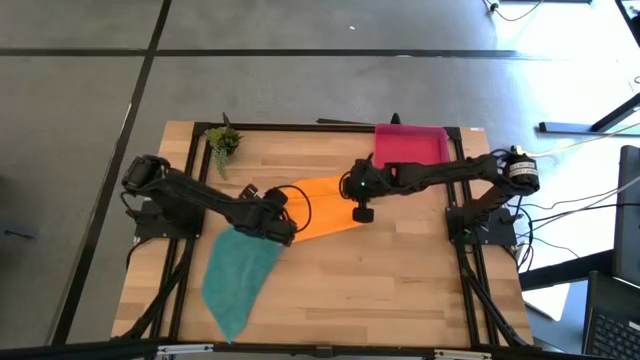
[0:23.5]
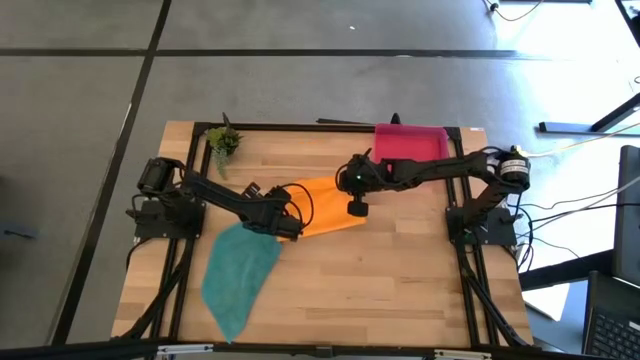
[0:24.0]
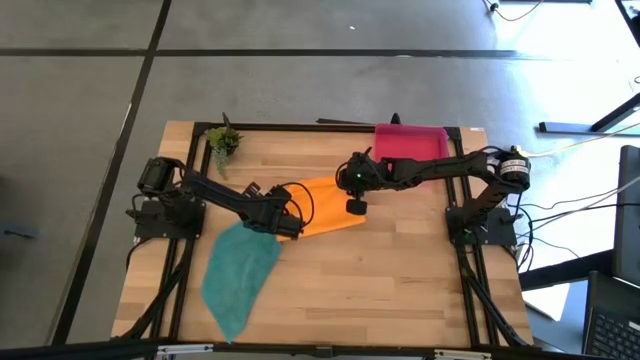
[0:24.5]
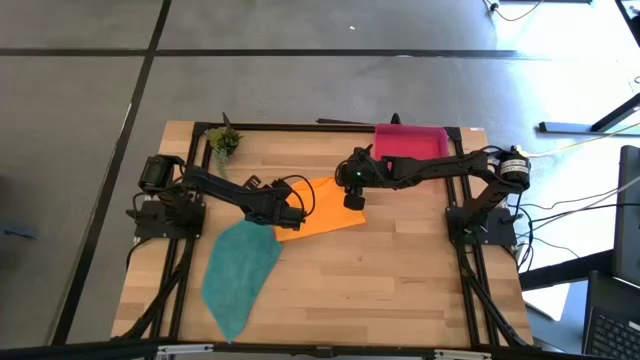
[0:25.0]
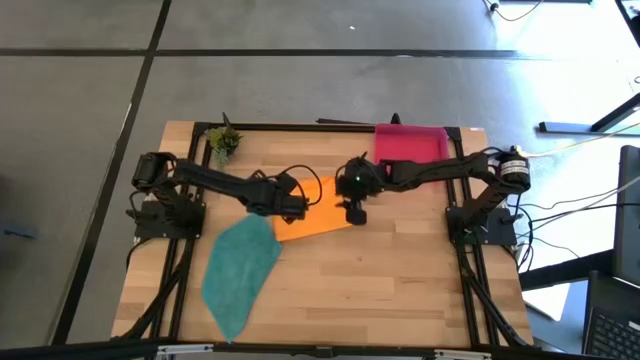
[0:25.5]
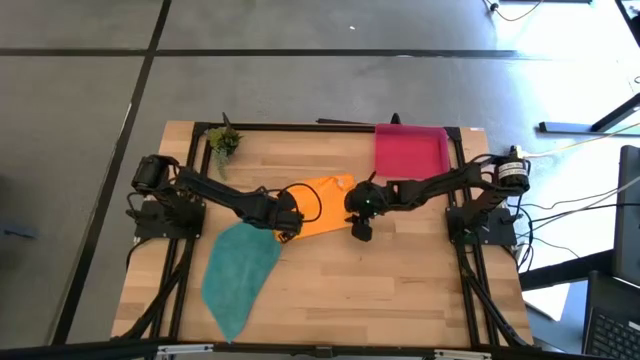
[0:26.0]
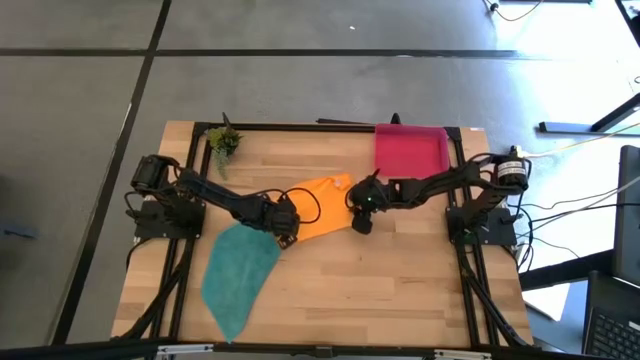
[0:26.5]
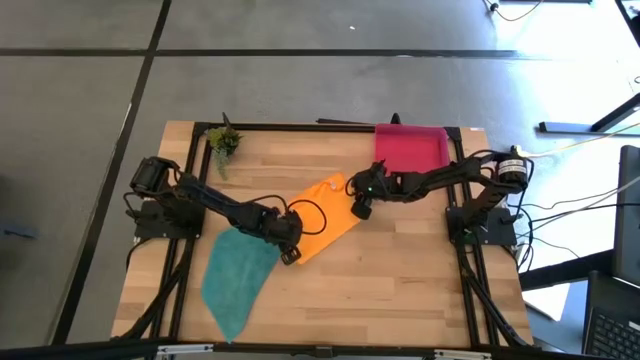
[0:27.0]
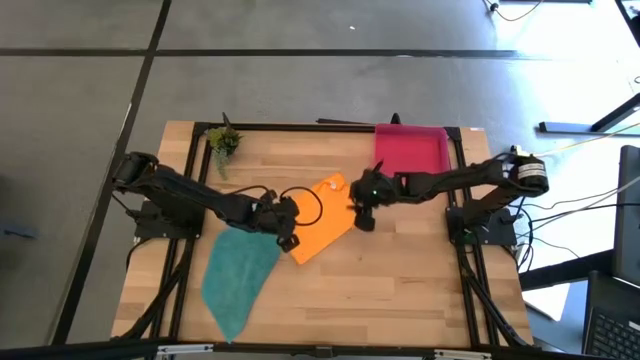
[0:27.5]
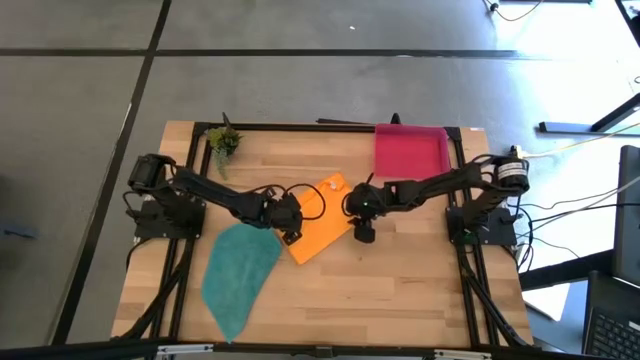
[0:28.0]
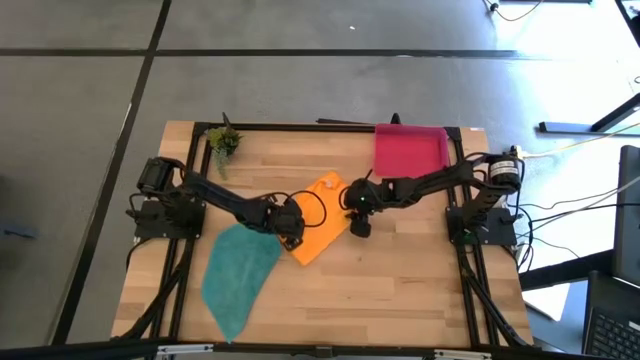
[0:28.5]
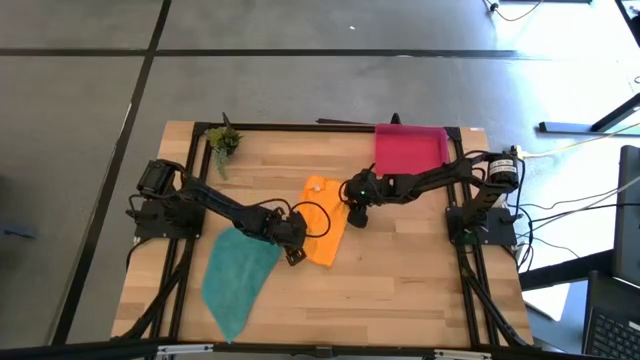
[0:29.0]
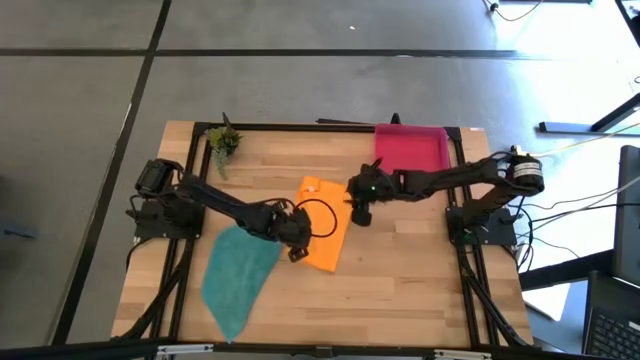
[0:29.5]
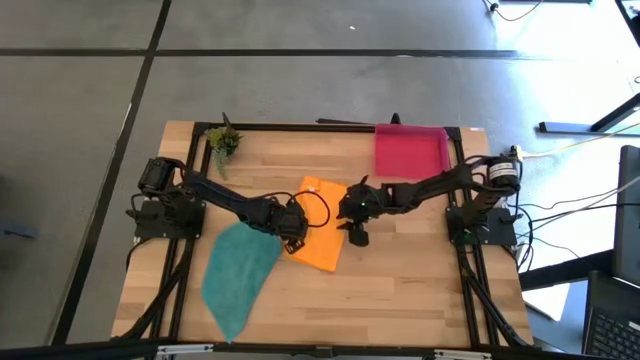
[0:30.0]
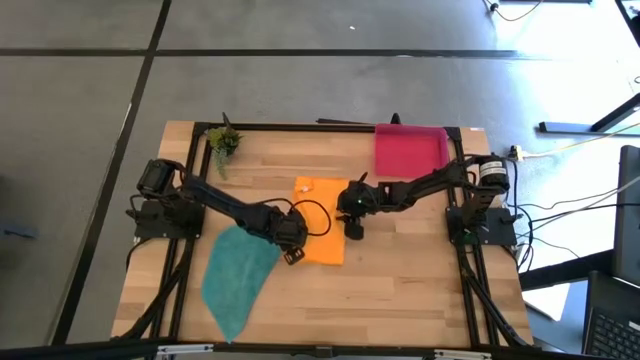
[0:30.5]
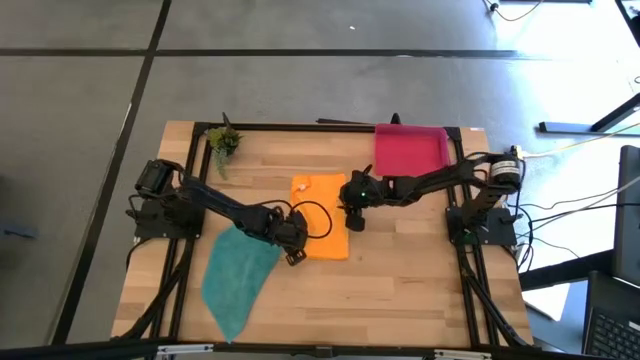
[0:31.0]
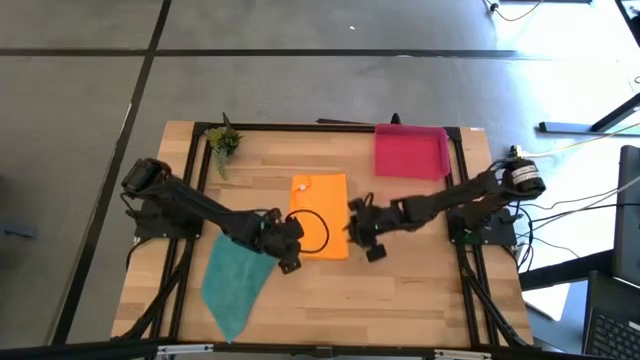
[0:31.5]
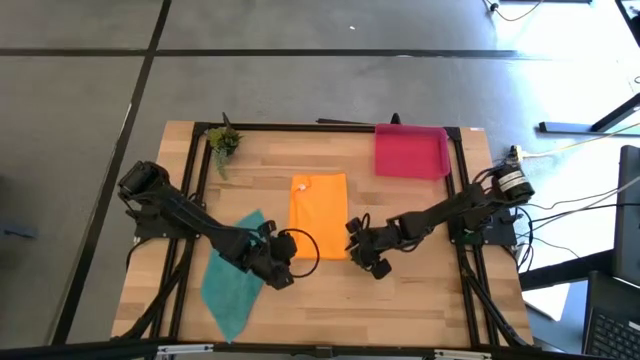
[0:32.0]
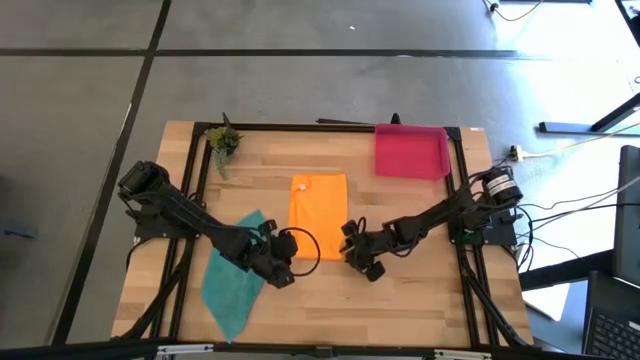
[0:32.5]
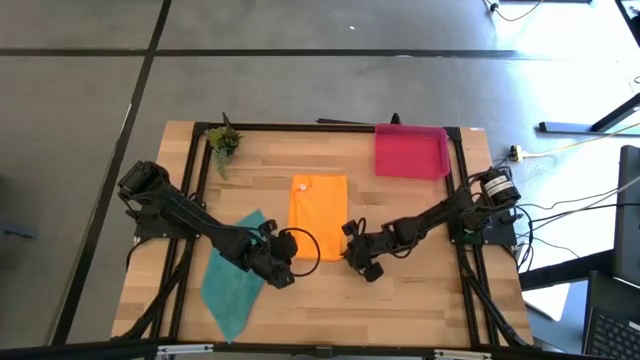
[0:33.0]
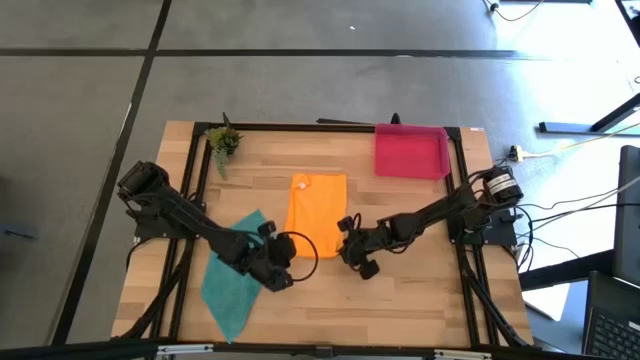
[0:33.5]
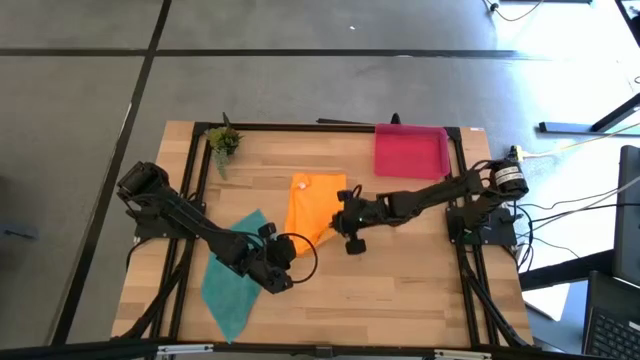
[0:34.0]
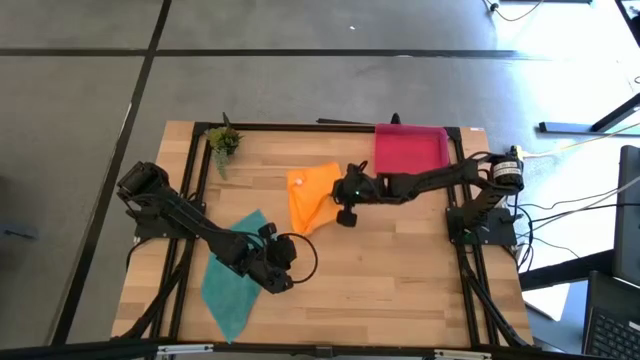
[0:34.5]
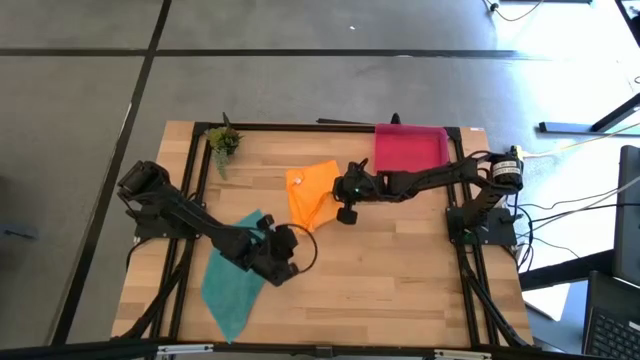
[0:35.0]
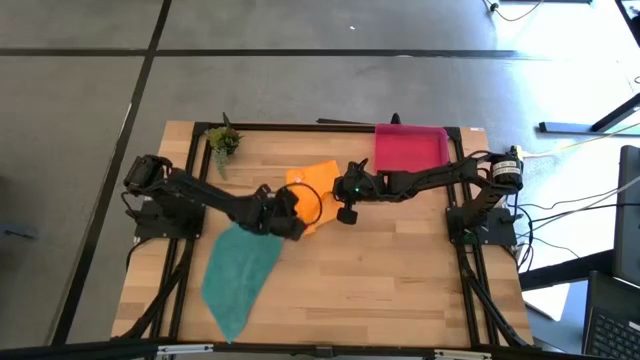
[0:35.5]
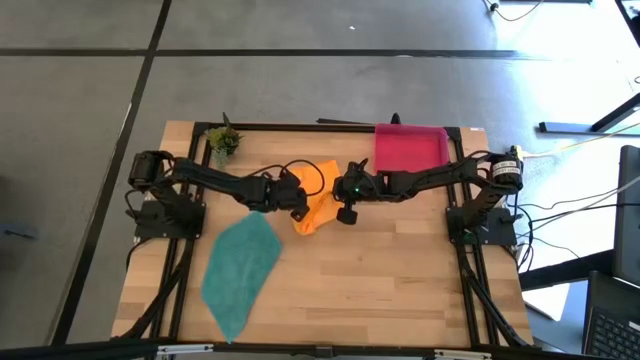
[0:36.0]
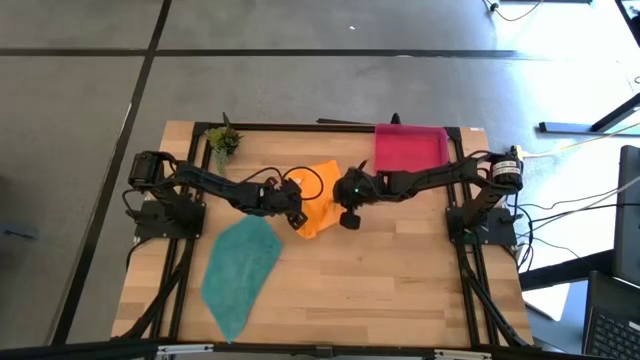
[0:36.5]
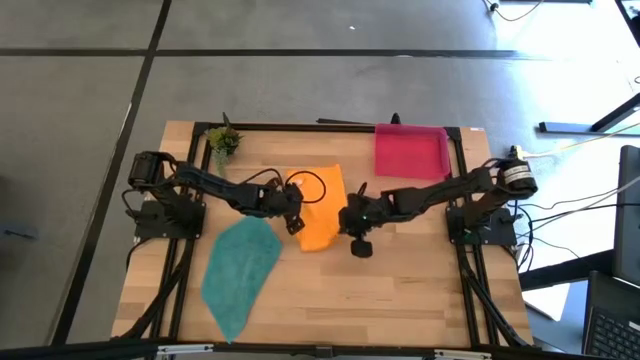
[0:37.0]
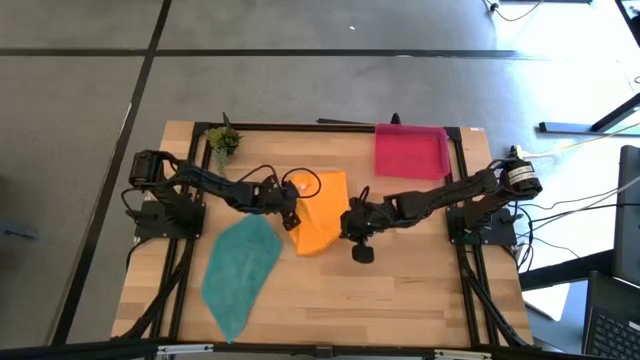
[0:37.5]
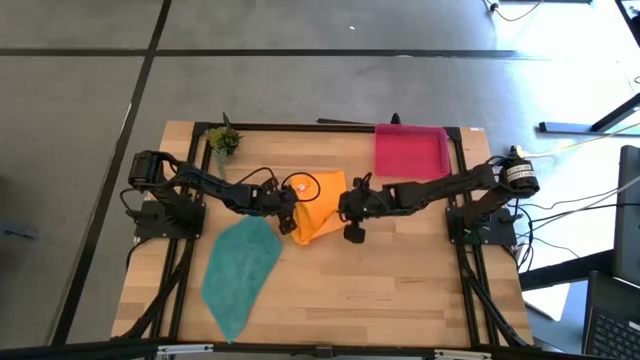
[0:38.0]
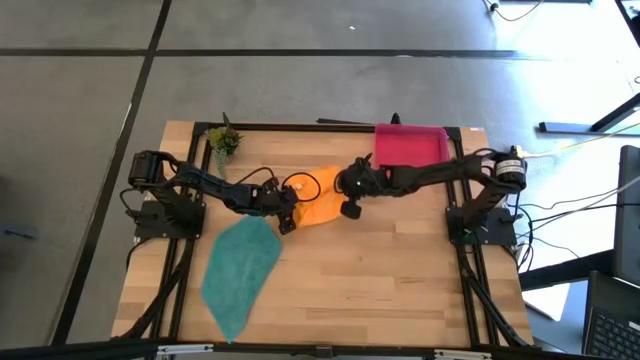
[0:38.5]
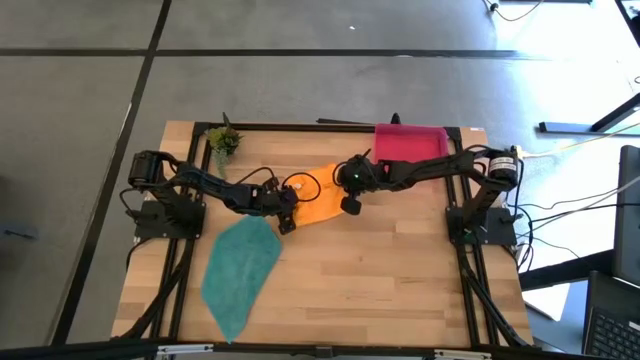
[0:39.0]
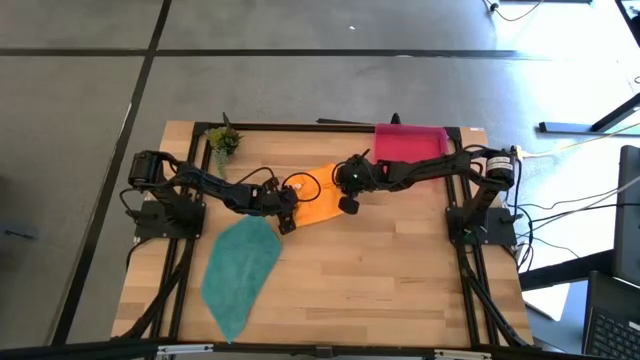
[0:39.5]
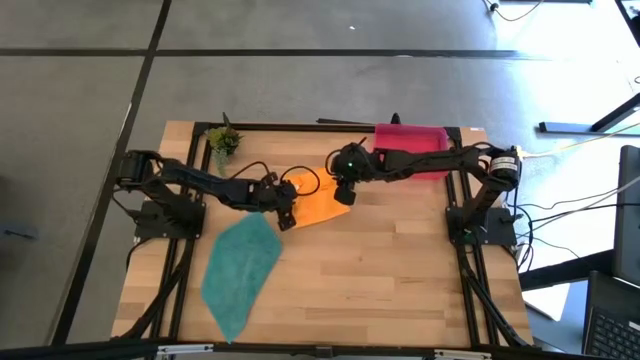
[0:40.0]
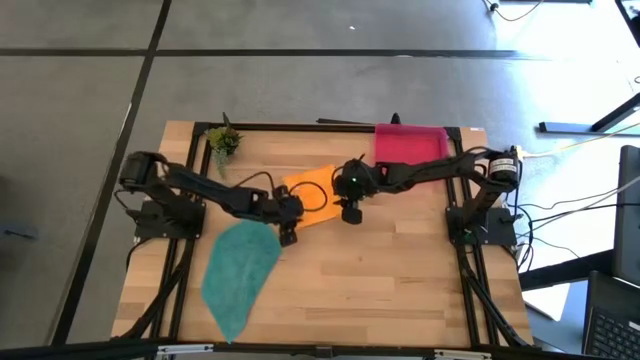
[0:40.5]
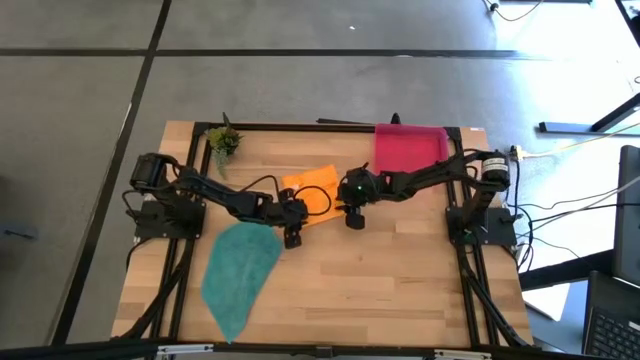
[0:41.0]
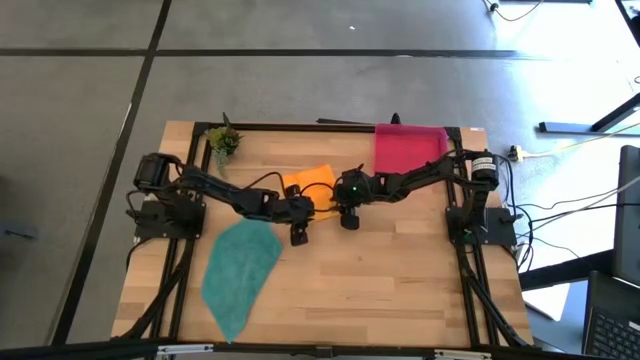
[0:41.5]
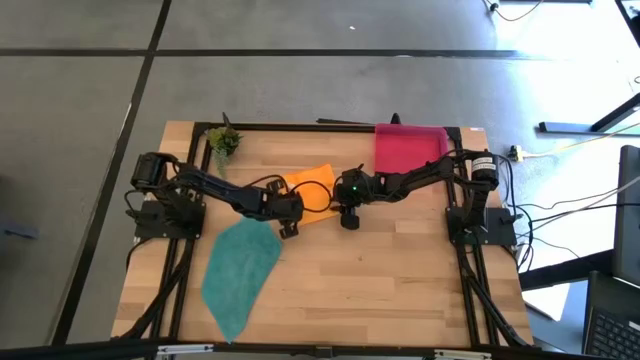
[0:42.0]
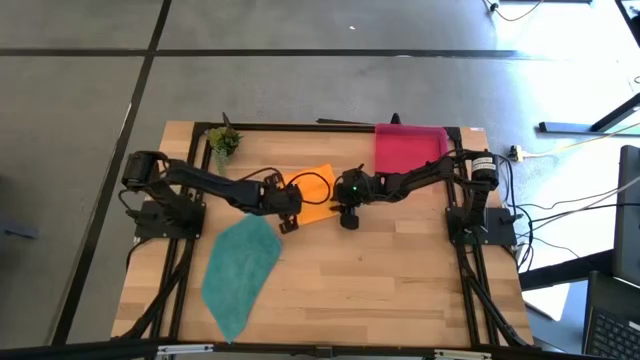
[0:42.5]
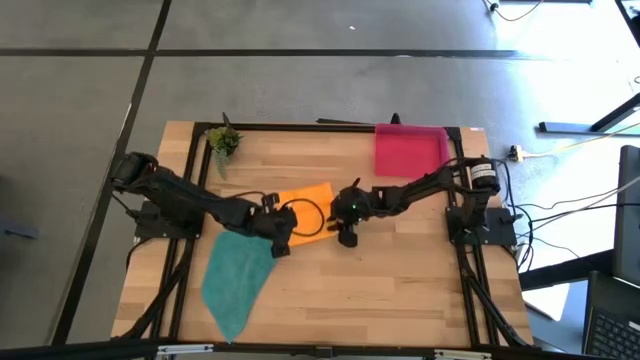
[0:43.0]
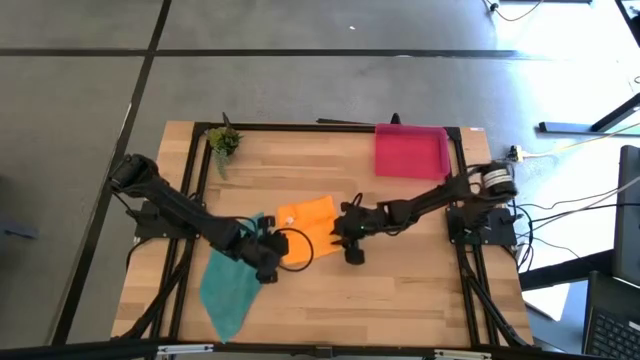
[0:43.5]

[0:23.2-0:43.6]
Task: Roll microfiber towels into tight, uniform cylinder then place into a basket
Fold the orange microfiber towel
